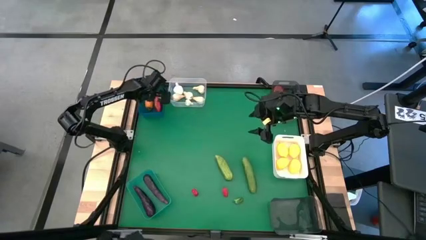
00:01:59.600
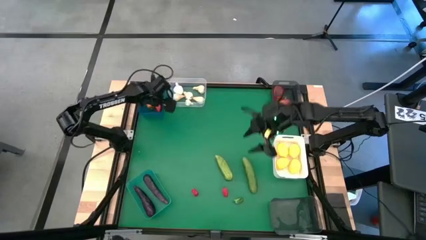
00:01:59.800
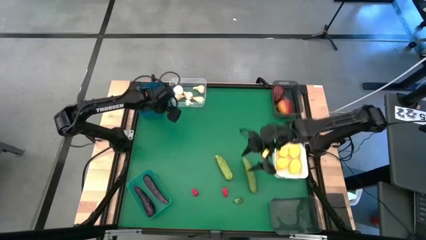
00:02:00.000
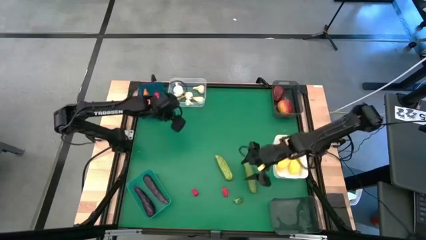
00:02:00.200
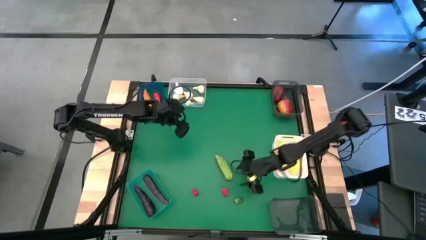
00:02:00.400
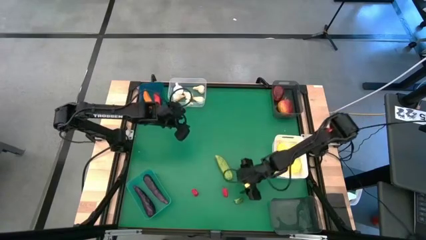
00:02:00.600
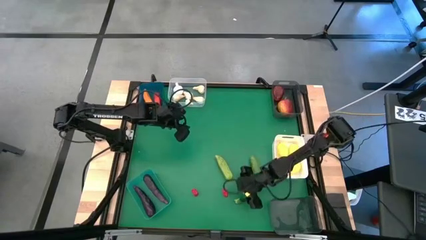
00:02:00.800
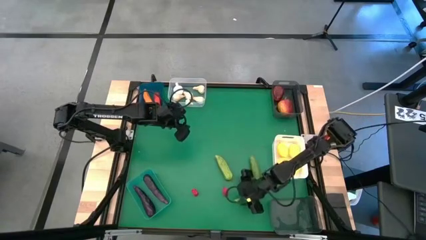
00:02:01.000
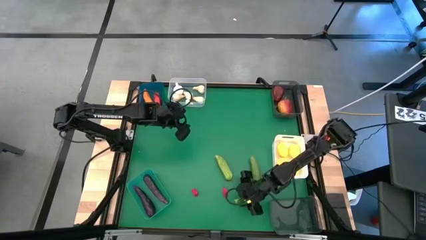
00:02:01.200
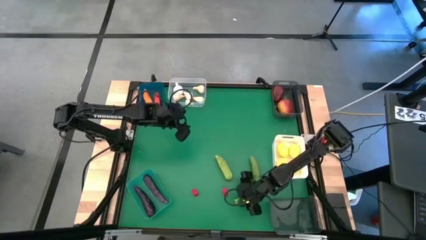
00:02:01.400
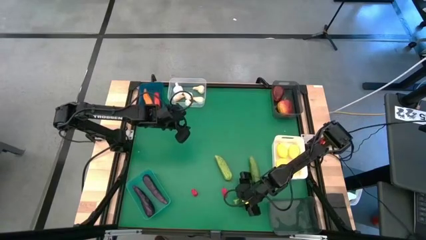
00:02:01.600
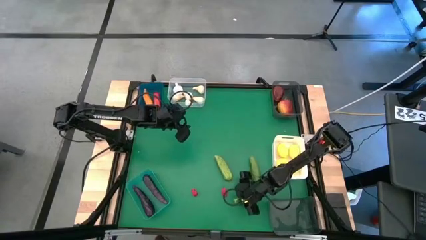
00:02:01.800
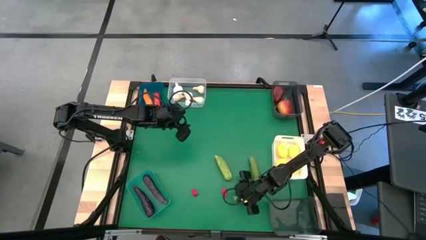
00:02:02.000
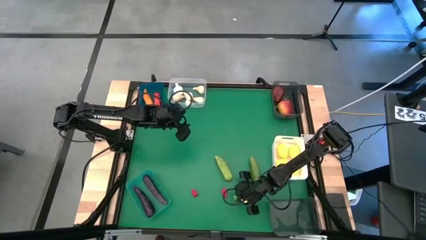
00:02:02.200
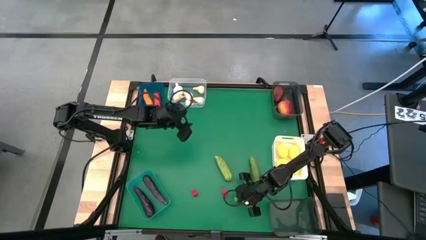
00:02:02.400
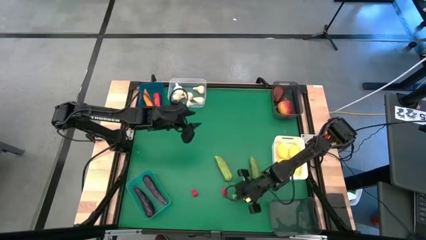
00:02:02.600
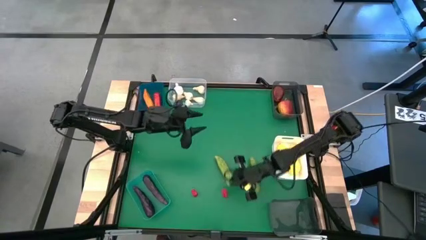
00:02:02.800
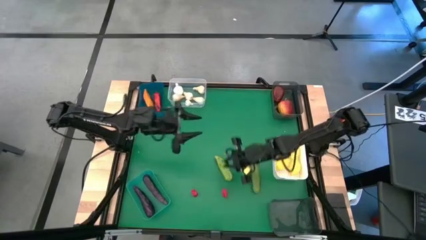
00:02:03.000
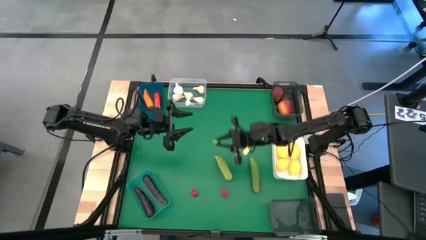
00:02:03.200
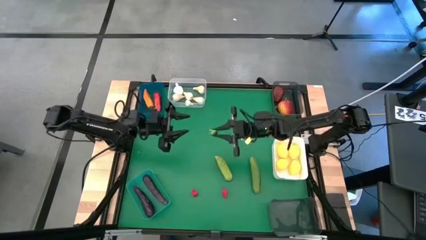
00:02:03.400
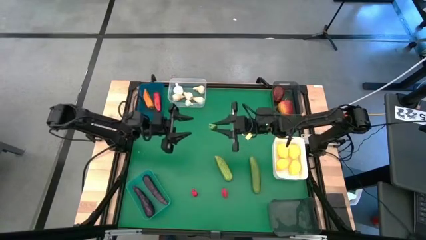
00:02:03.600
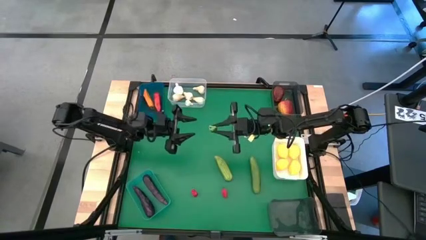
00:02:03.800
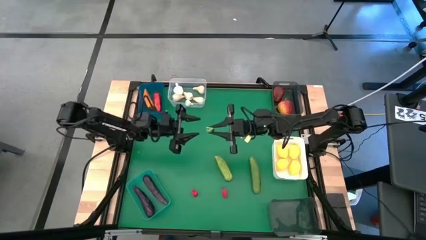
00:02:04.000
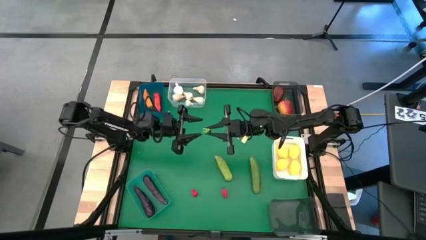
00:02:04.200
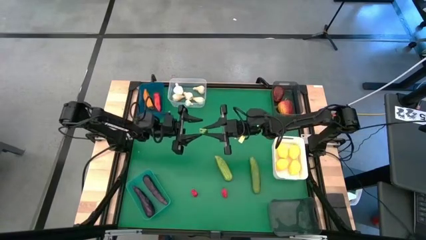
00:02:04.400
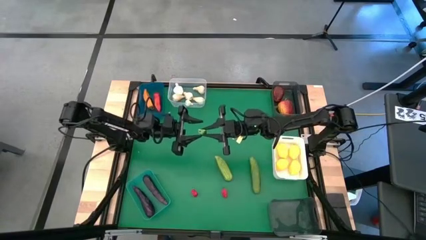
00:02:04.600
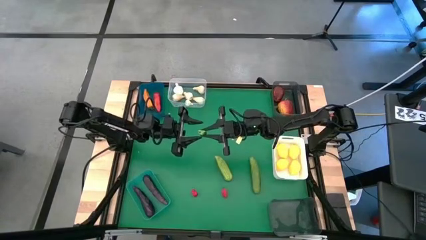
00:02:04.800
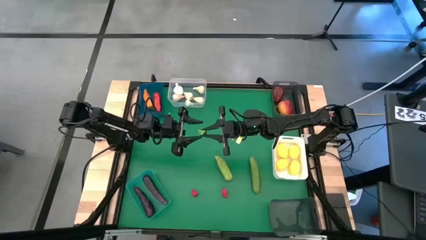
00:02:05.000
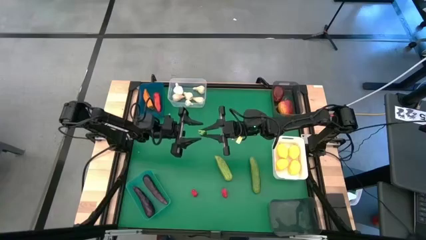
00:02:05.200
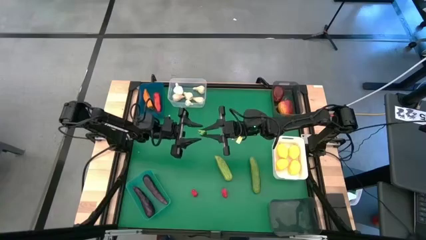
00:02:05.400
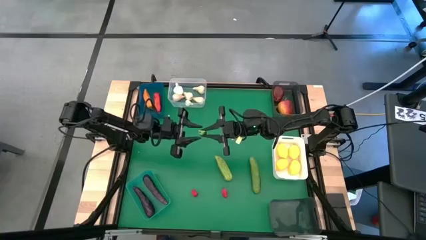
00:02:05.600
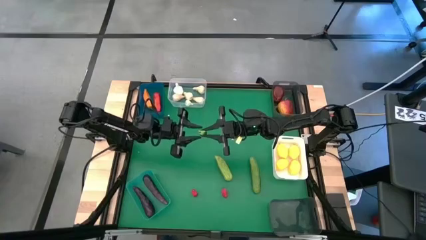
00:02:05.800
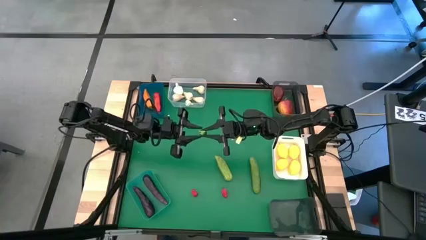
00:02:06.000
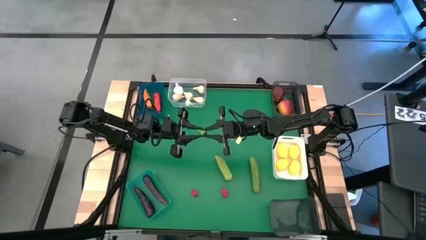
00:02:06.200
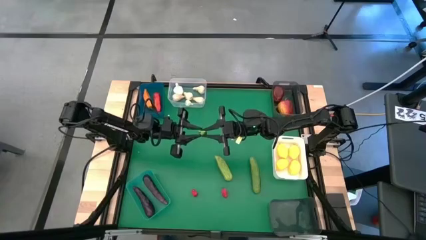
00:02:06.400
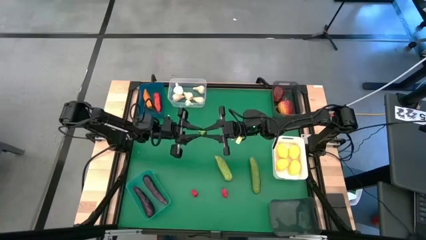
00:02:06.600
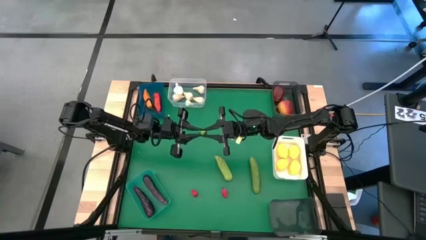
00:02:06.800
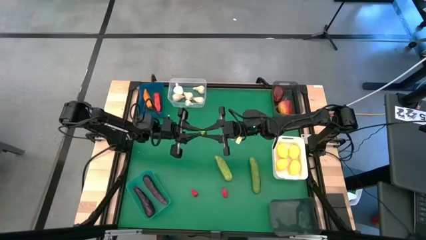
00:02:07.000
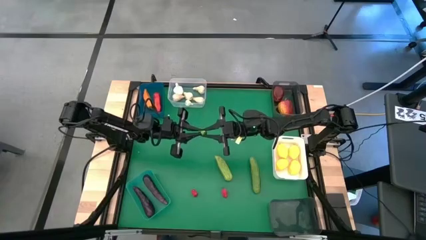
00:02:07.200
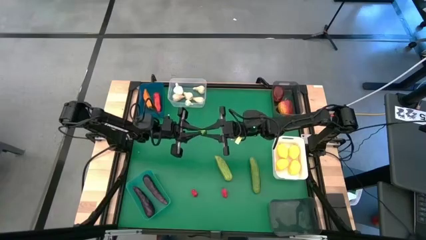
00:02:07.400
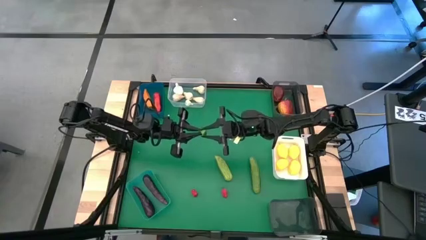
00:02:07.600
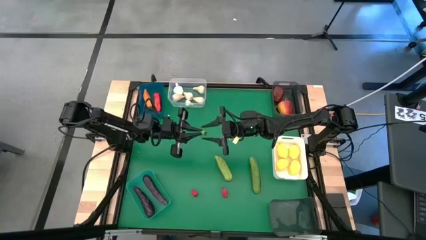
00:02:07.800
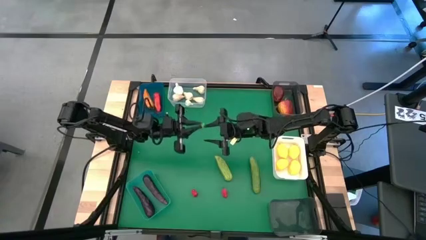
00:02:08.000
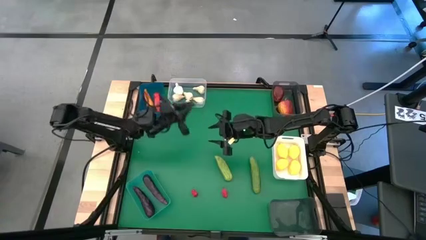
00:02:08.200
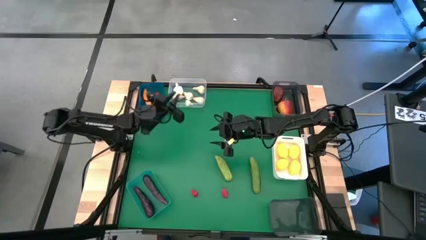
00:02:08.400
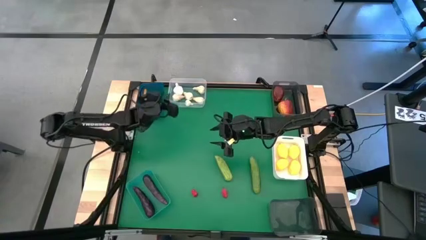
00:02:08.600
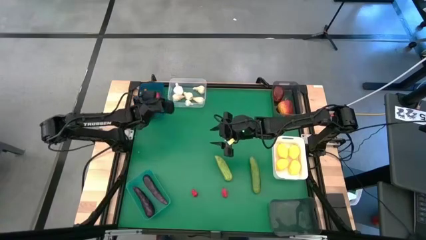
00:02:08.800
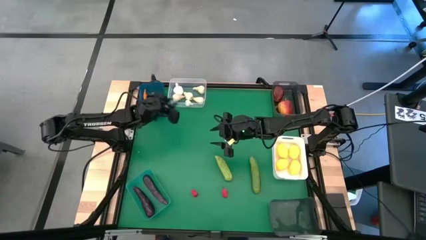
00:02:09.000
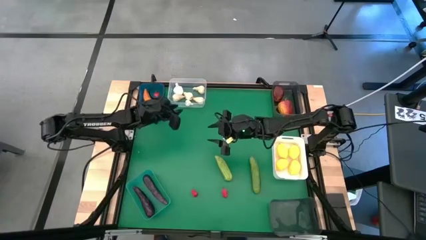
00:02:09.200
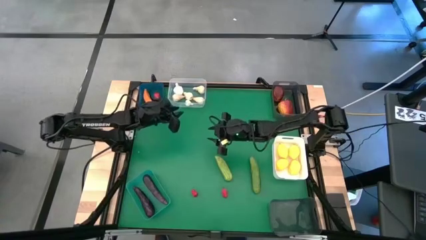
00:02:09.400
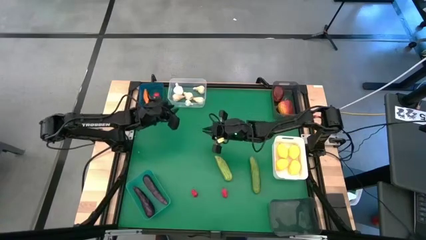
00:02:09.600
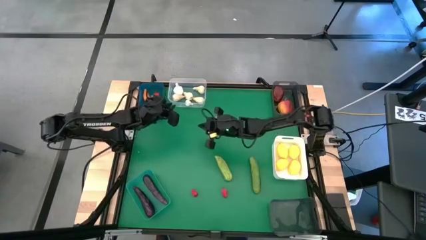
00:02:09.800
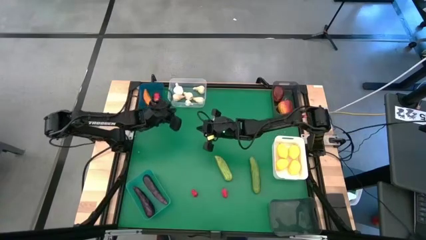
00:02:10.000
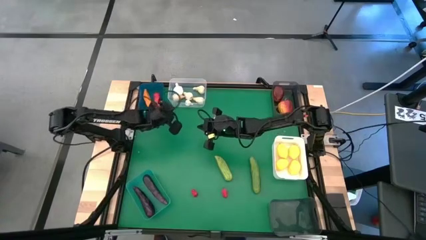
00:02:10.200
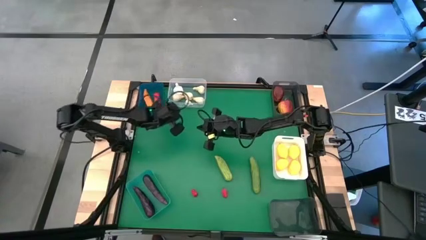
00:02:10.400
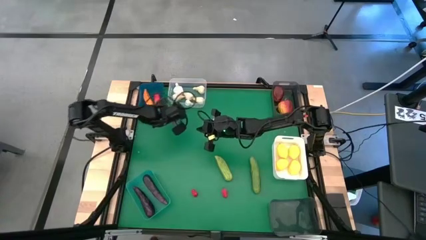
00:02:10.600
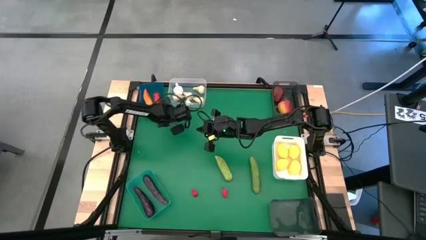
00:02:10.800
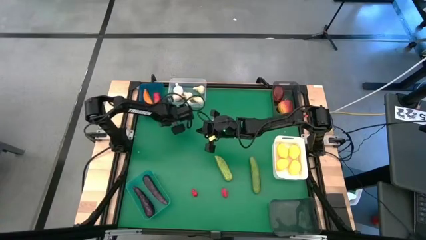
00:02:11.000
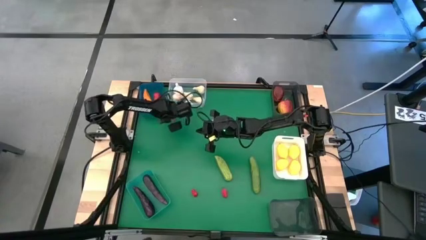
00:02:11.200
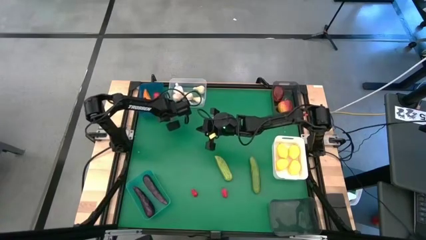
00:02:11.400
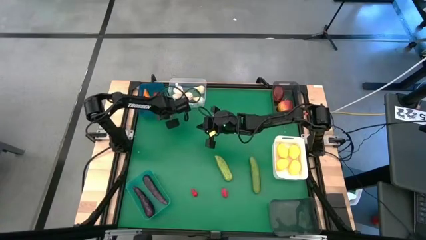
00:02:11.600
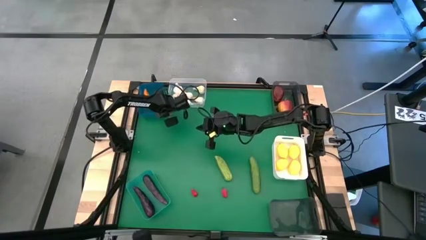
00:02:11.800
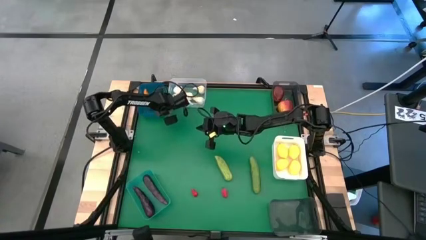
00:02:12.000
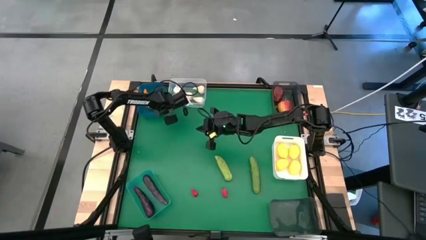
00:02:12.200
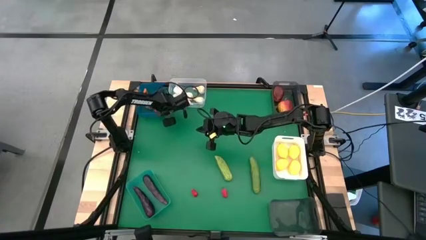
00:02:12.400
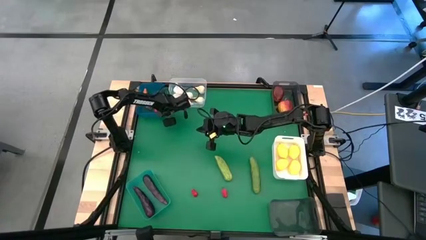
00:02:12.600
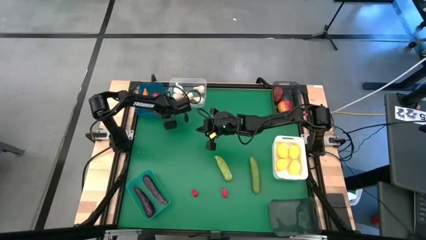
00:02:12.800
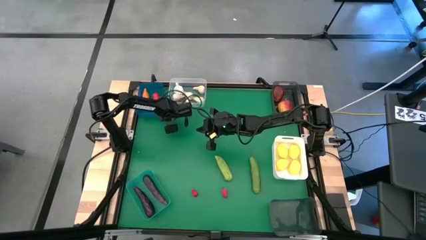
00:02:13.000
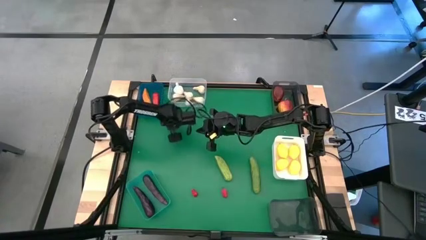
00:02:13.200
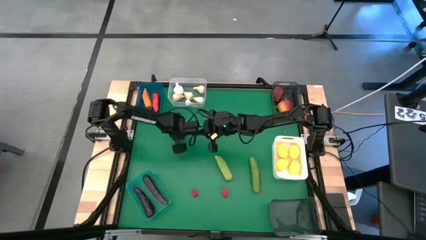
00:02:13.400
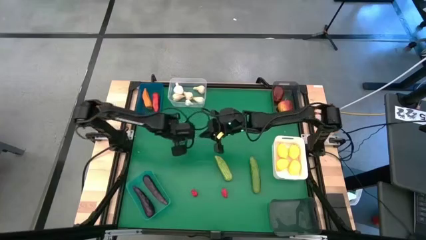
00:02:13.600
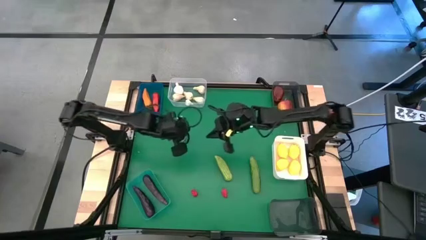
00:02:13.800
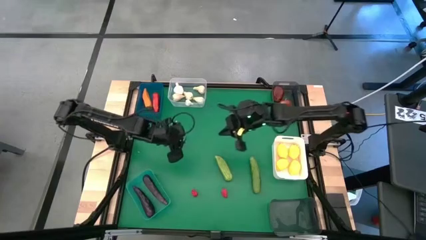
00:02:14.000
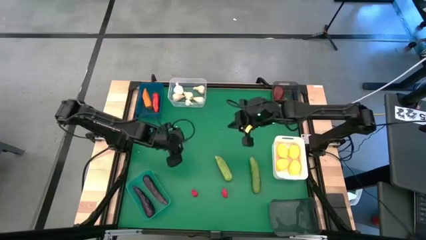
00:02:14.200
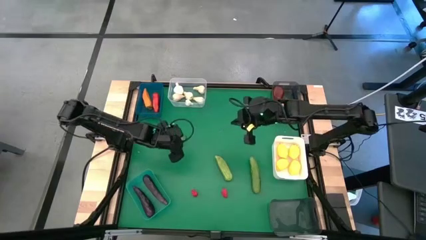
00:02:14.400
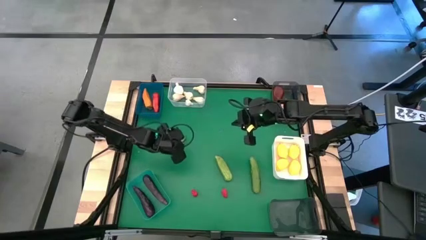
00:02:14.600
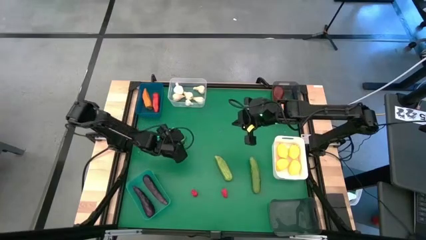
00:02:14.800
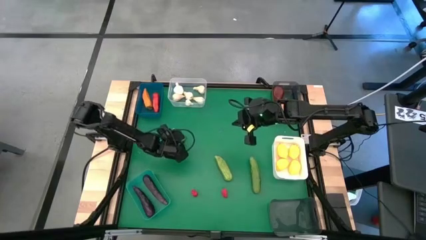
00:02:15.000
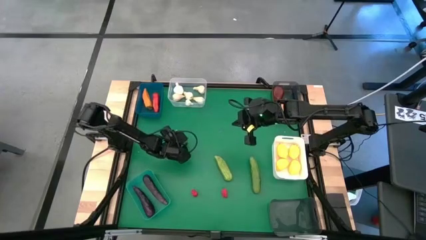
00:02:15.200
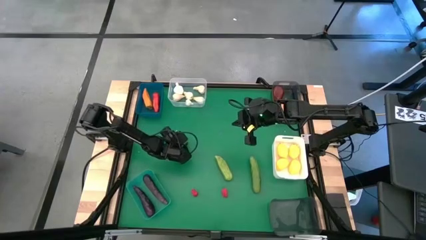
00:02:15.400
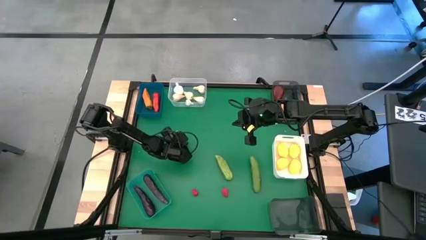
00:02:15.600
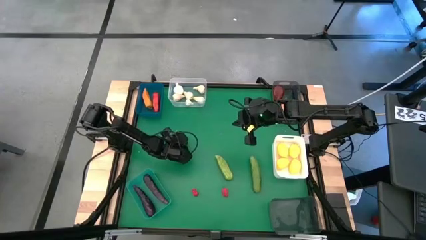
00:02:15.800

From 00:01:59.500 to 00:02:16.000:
Task: Sort produce into baskets
Put the green chili pepper into the blue bin

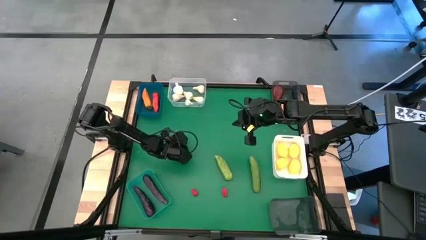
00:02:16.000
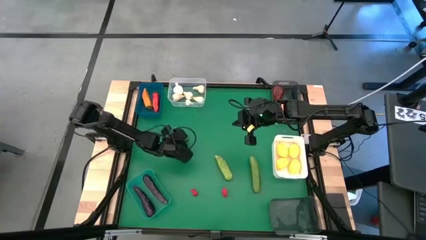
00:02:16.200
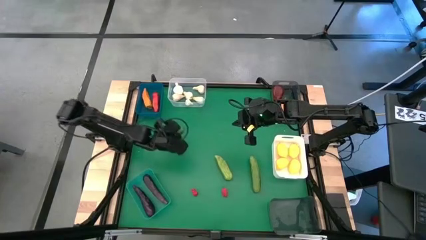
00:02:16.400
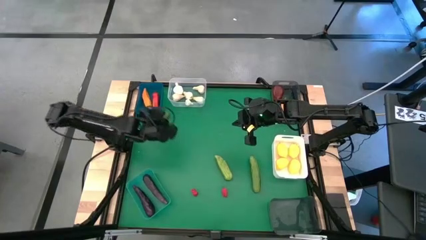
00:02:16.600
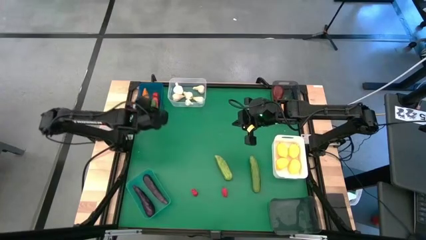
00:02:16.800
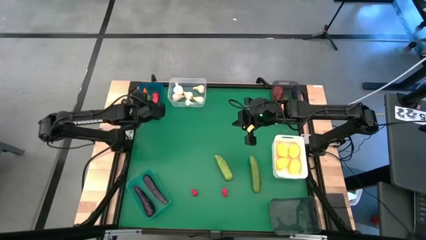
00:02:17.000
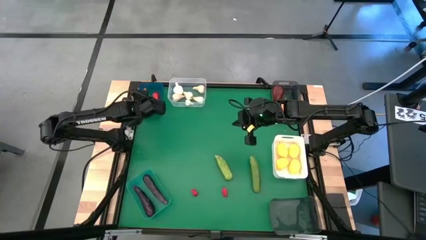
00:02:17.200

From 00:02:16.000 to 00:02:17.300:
Put the green chili pepper into the blue bin
